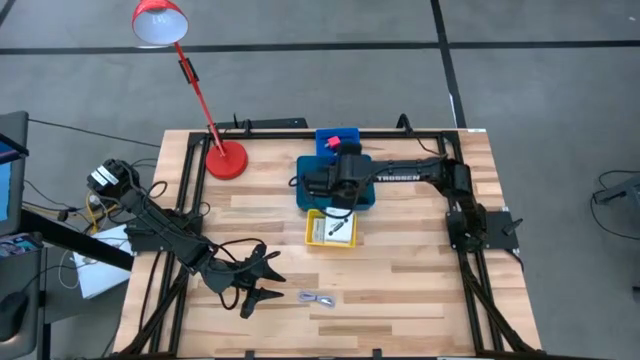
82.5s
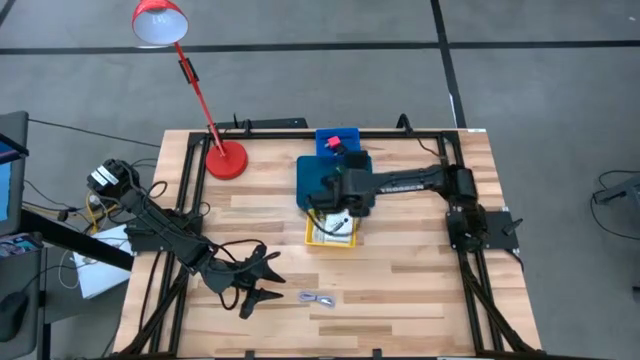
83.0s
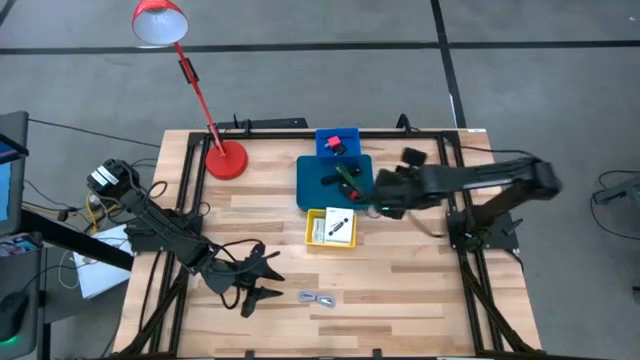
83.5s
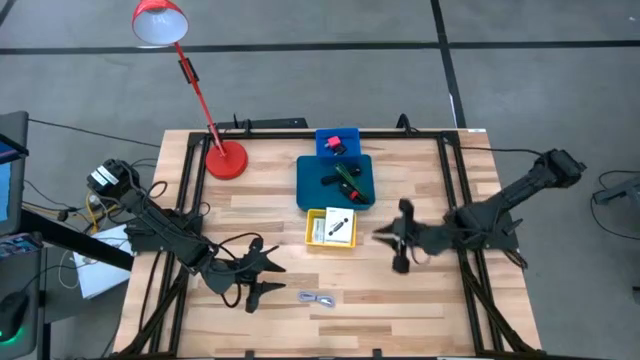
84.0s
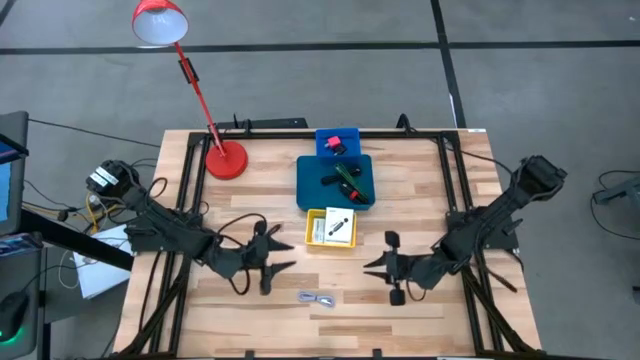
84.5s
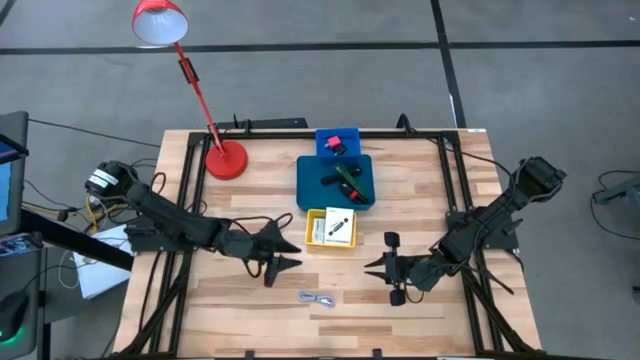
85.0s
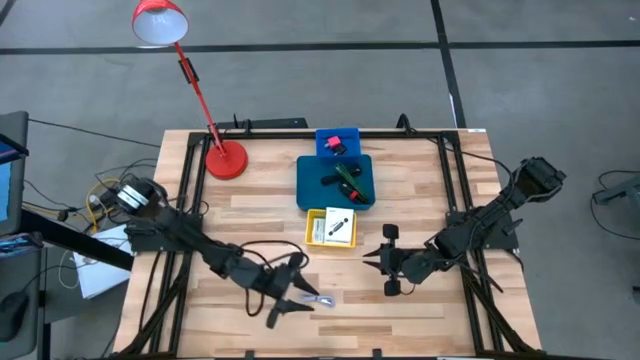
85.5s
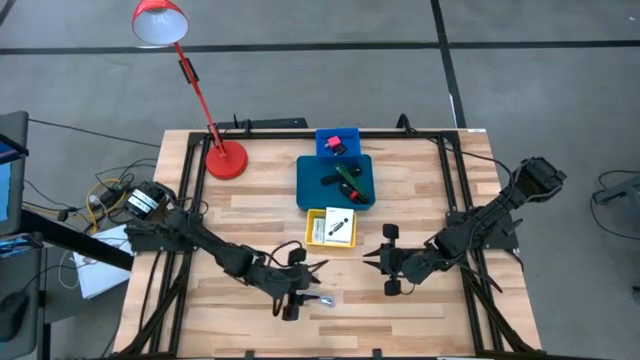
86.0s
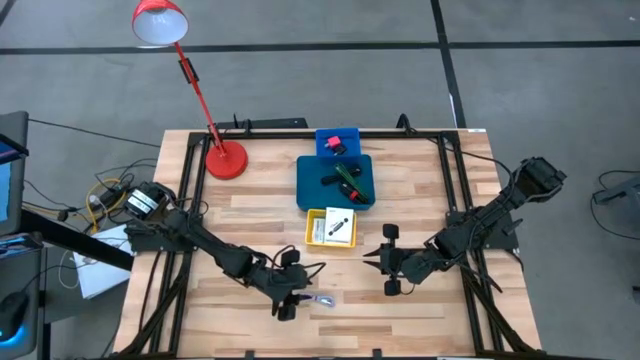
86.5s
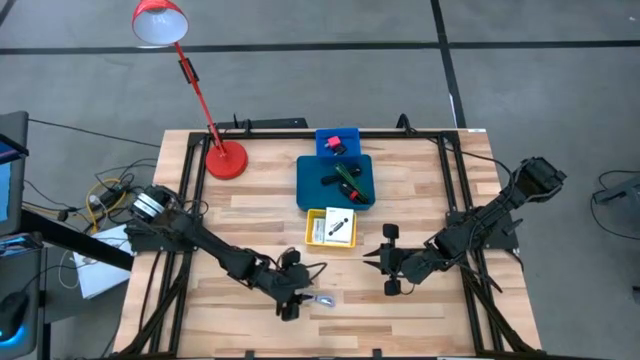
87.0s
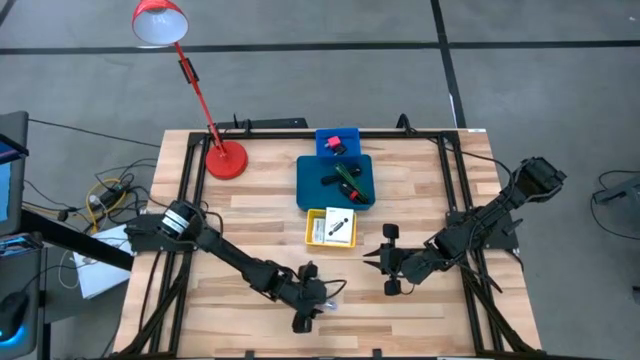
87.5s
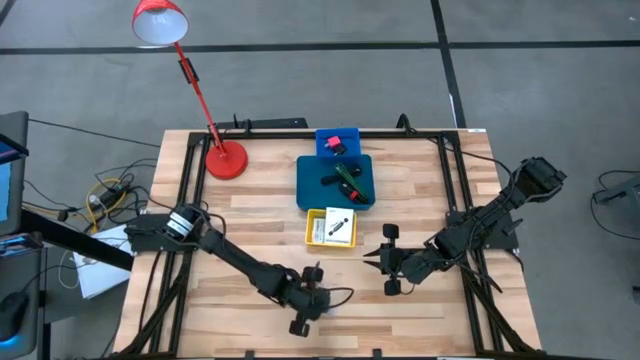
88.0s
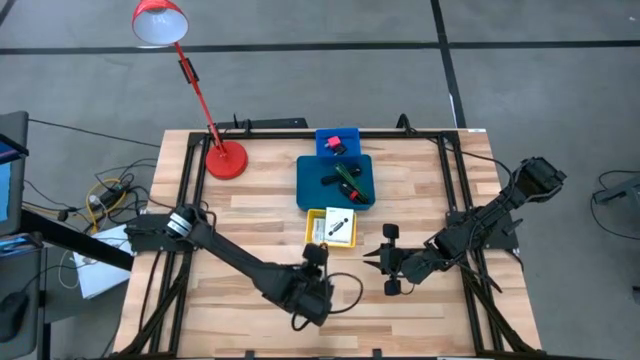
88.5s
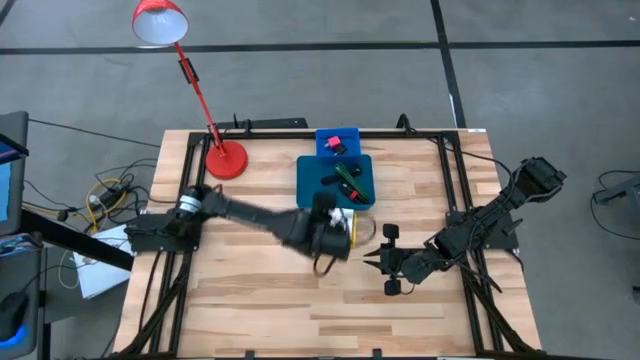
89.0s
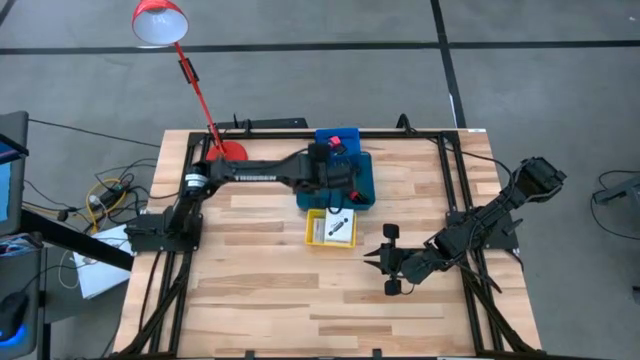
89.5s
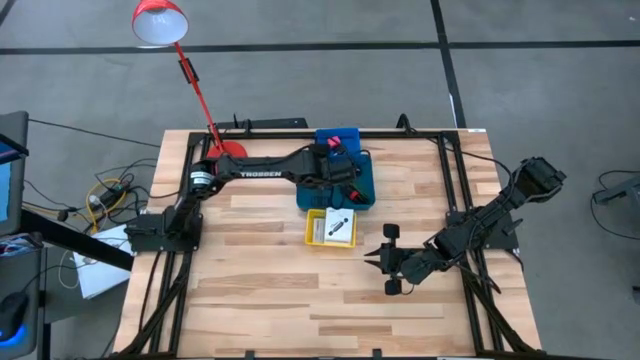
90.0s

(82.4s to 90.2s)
Task: Pick and place items into bin
Put the purple charger cable into the bottom blue basket

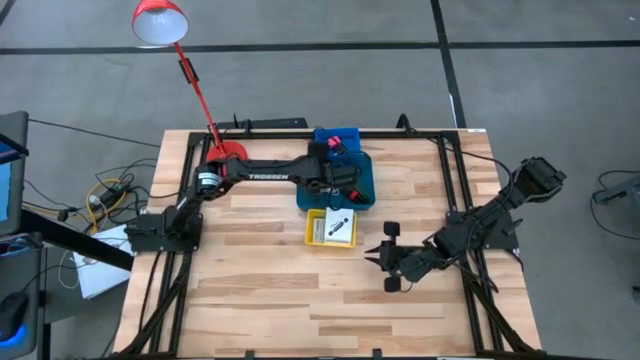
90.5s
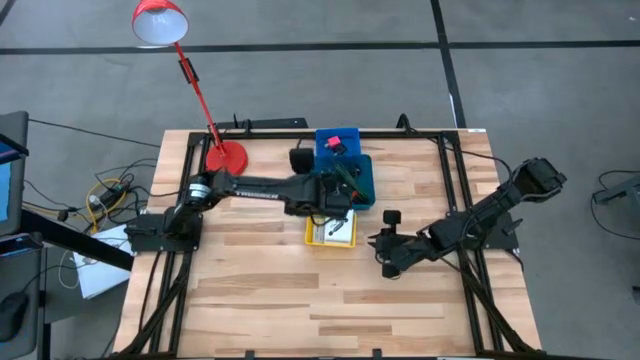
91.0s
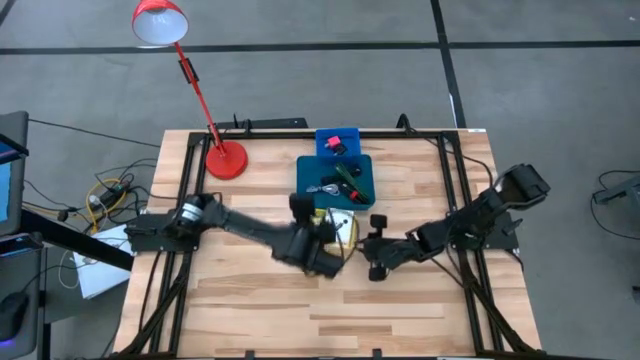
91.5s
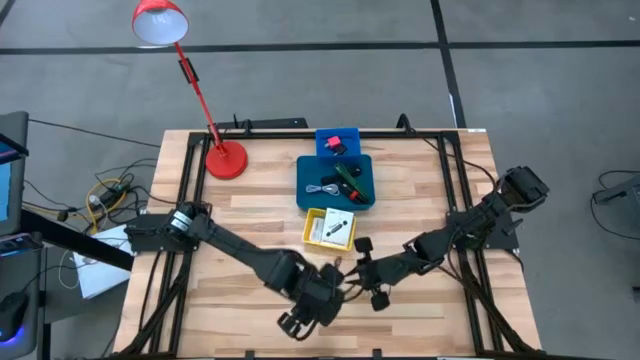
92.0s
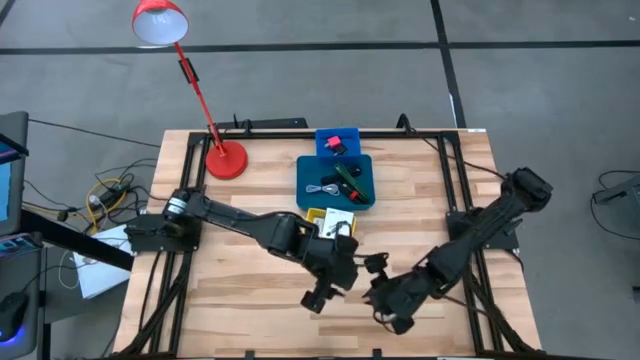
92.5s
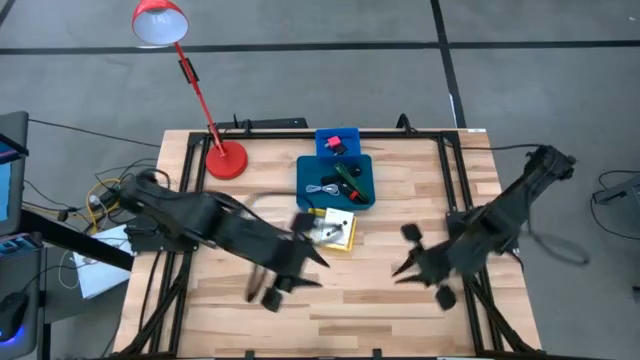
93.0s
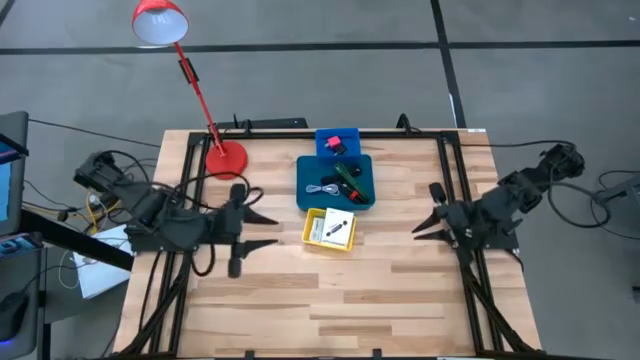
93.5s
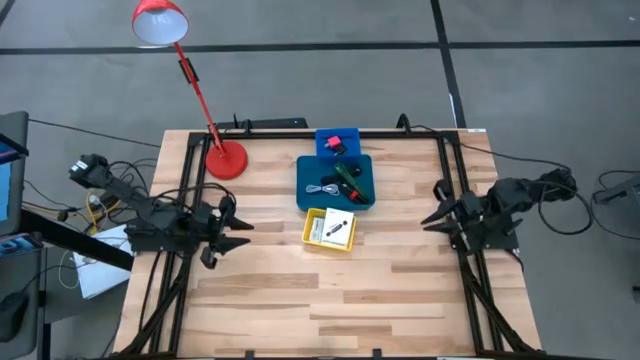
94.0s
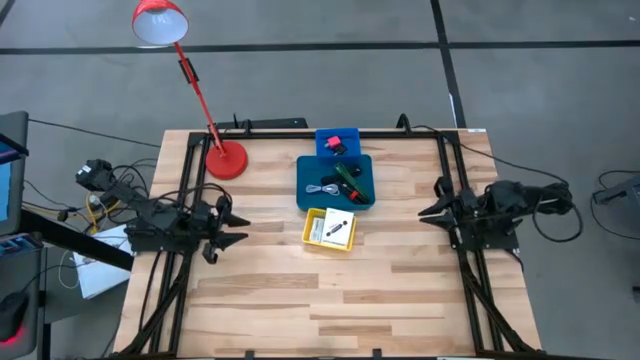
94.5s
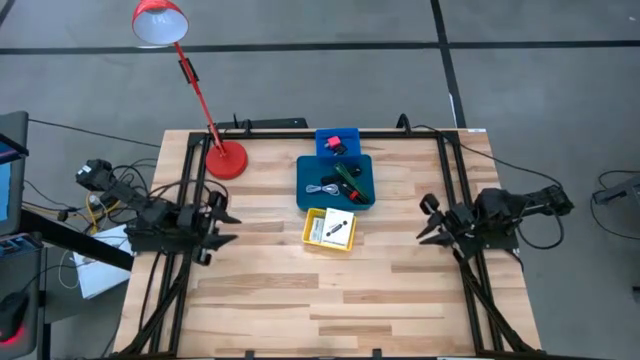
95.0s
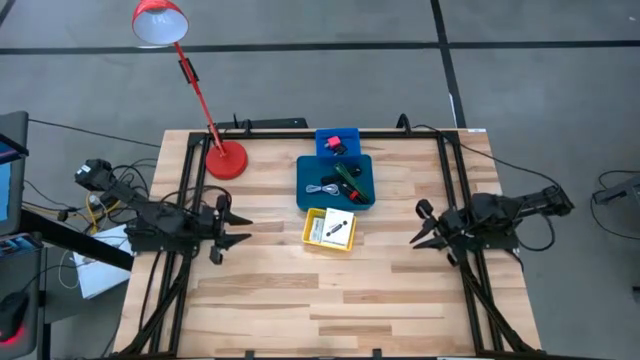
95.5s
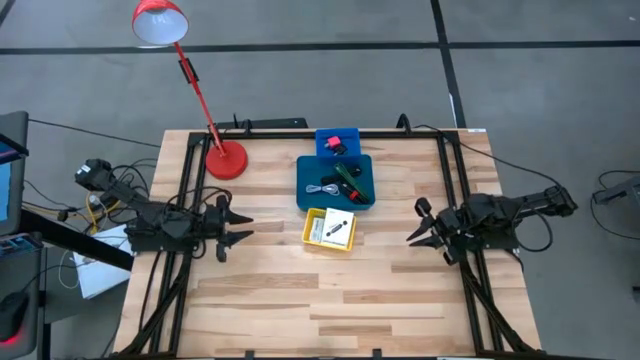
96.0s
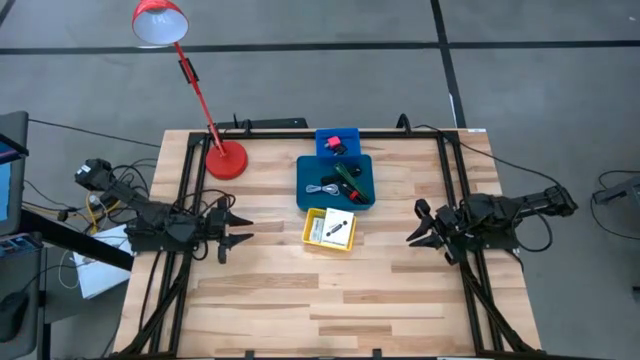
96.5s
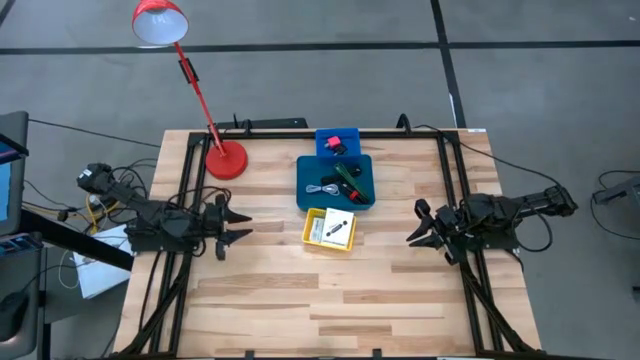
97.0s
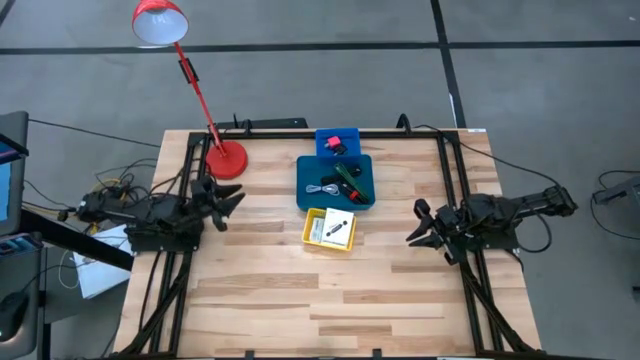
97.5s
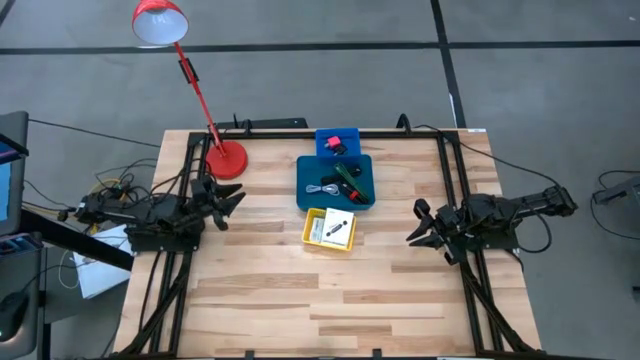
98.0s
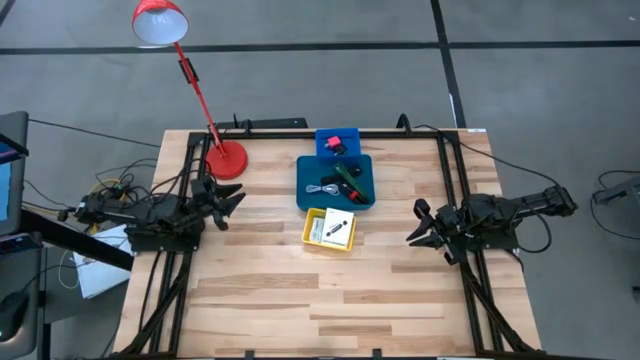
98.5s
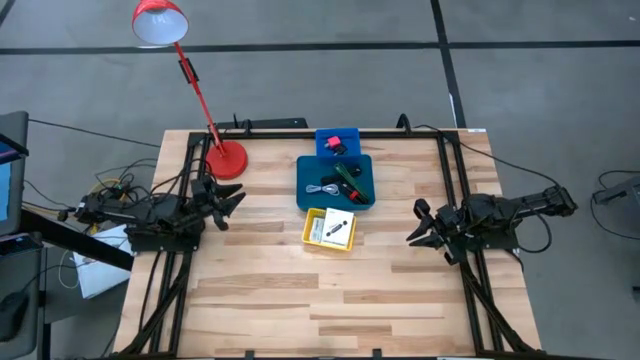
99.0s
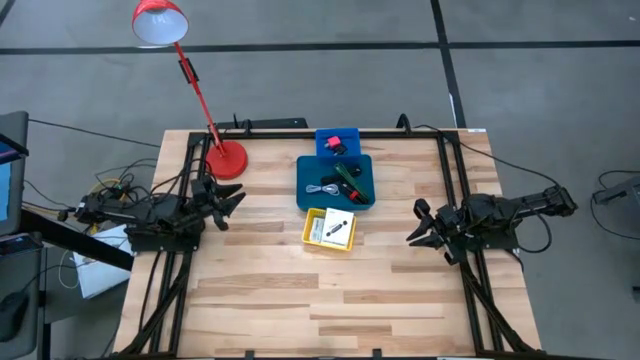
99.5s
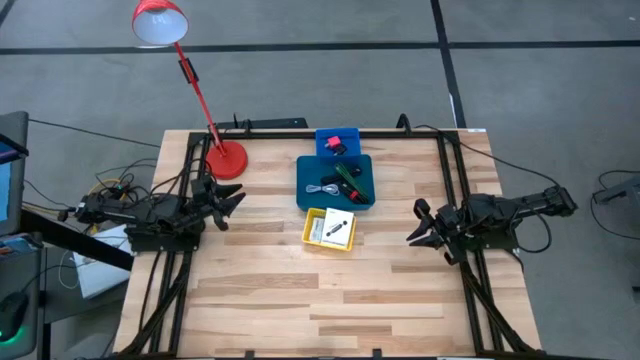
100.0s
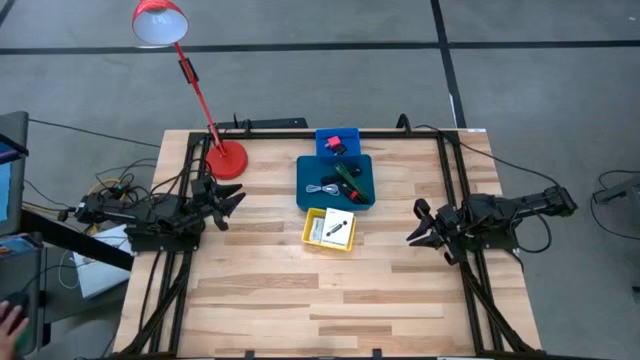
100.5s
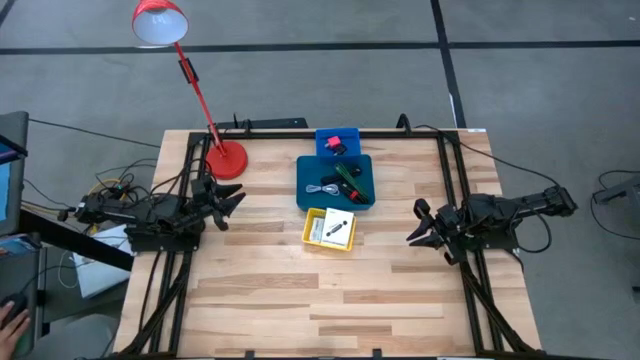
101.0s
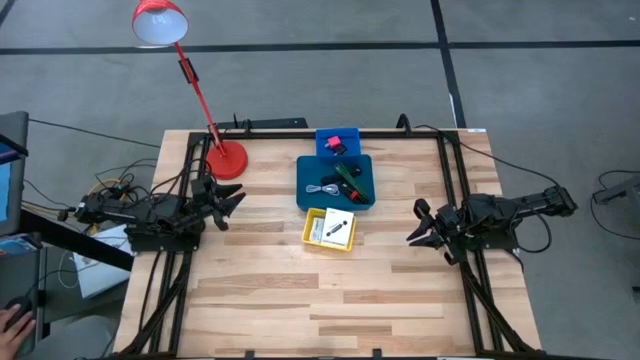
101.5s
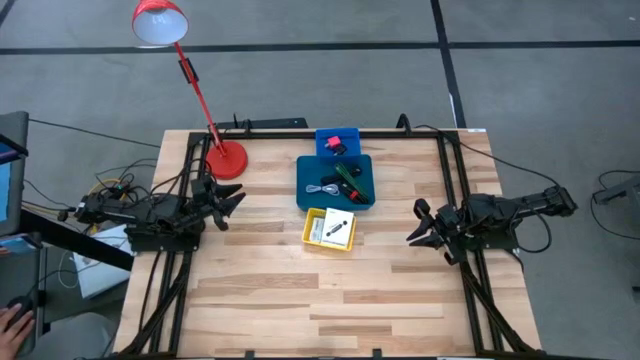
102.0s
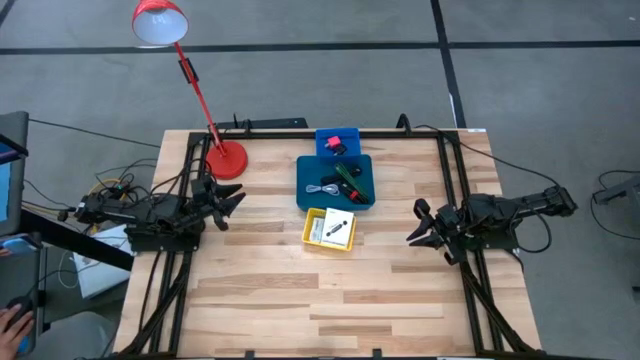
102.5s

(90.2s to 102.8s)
Return to Home Position

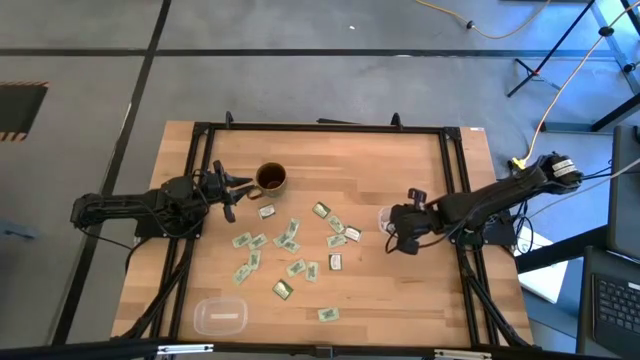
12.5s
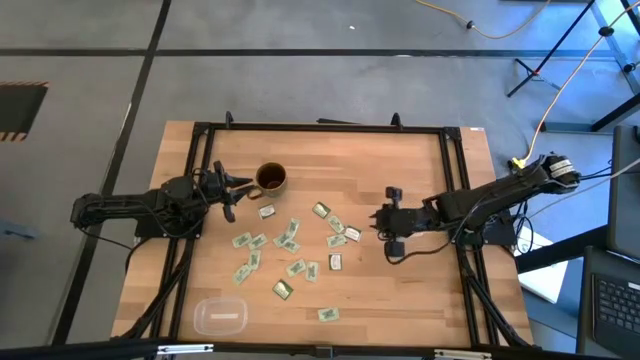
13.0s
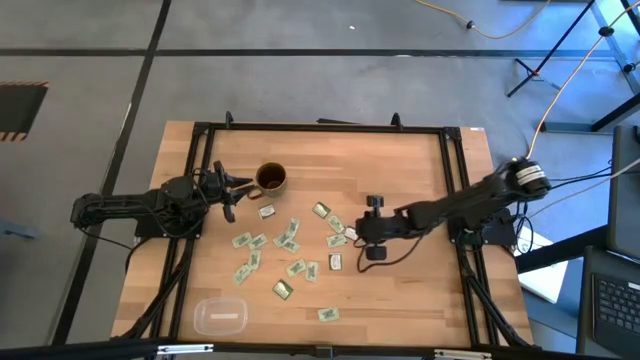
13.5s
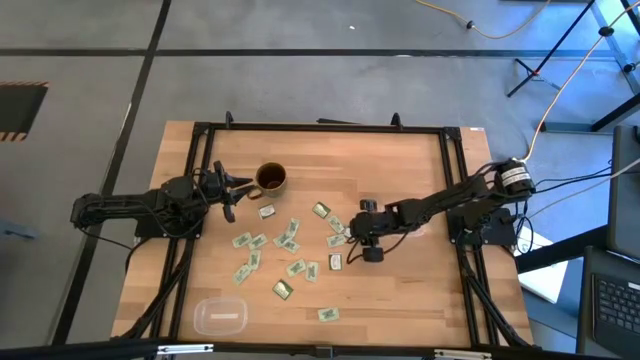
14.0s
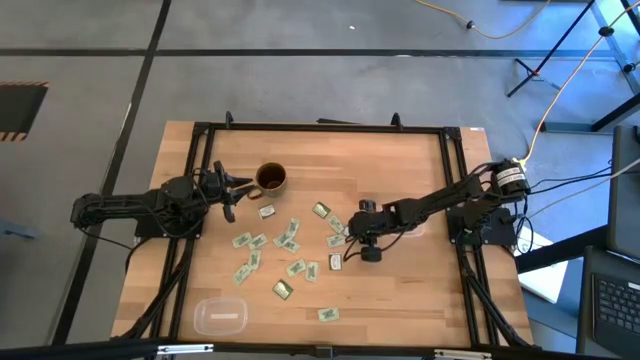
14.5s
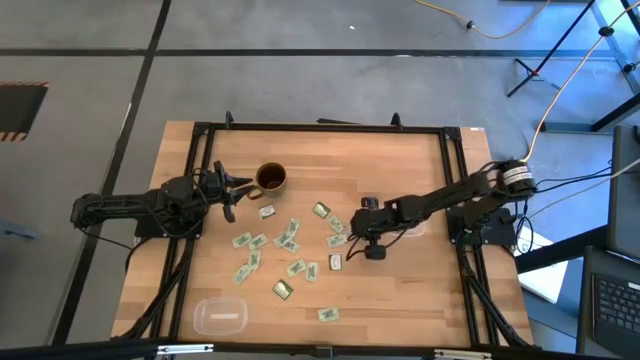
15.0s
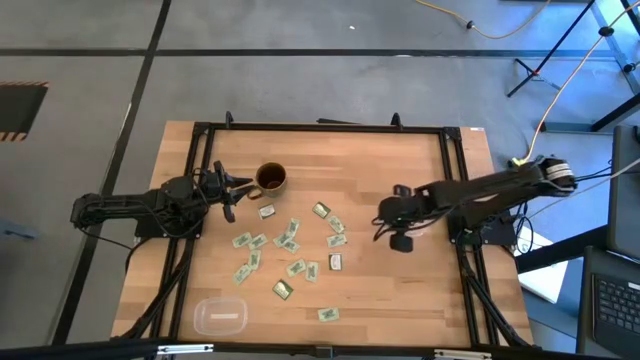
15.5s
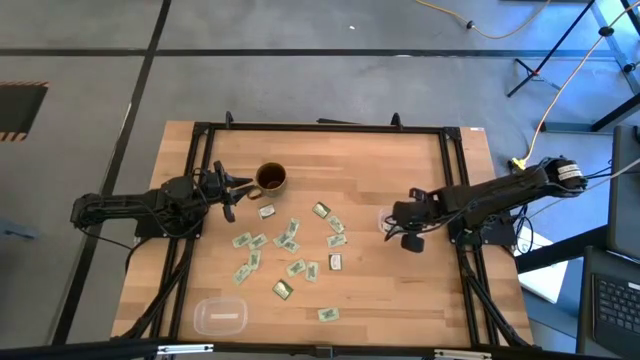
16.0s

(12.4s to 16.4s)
Task: Pick and place Stevia / Truvia into bins
Put the truvia packet into the top transparent container
